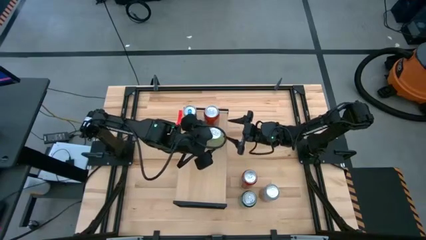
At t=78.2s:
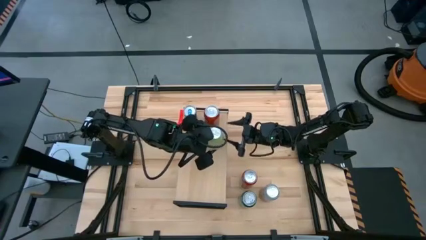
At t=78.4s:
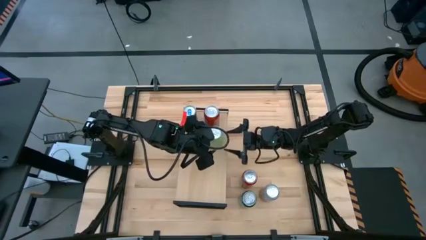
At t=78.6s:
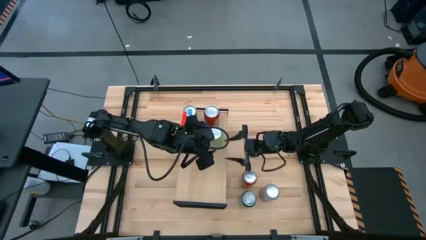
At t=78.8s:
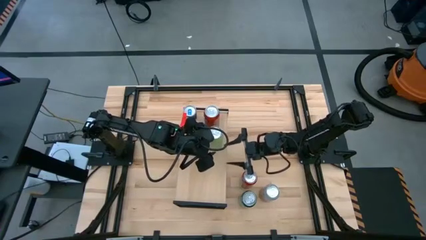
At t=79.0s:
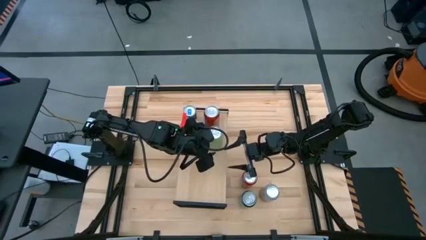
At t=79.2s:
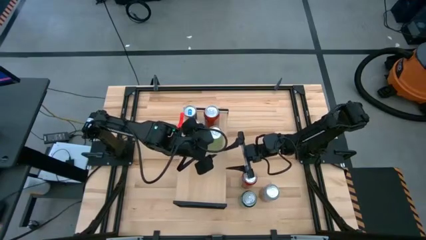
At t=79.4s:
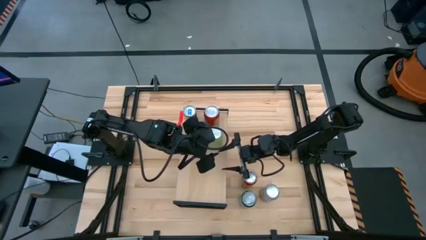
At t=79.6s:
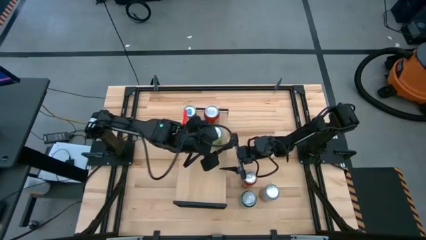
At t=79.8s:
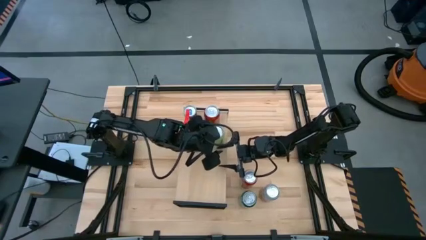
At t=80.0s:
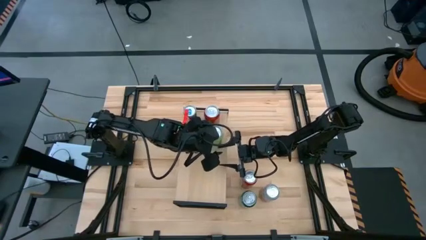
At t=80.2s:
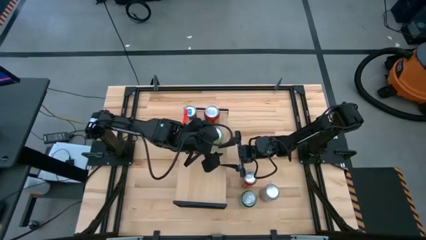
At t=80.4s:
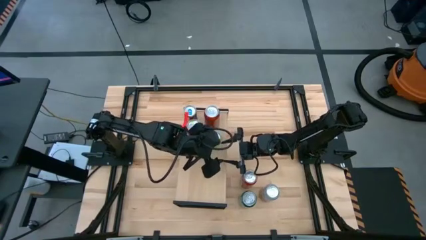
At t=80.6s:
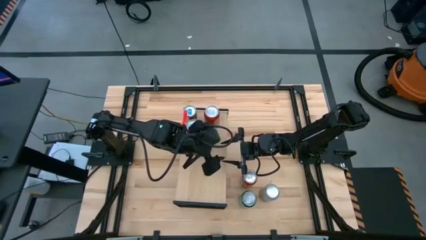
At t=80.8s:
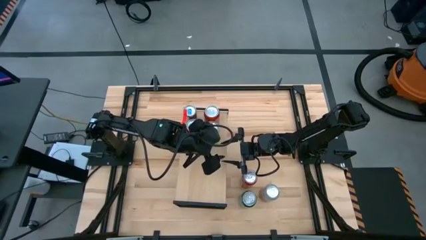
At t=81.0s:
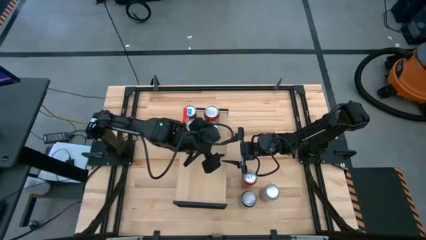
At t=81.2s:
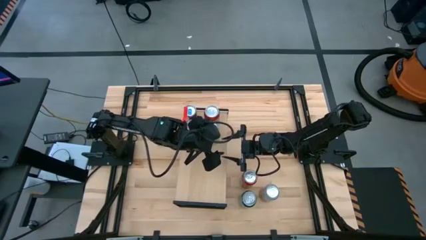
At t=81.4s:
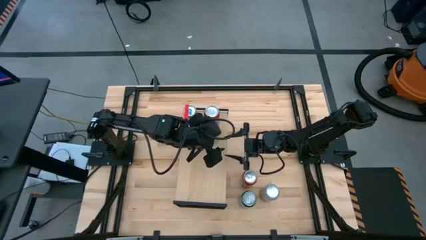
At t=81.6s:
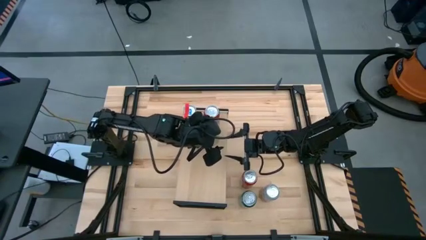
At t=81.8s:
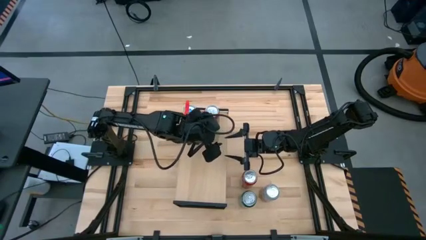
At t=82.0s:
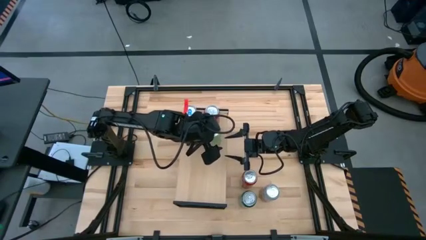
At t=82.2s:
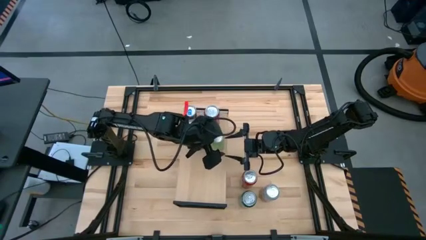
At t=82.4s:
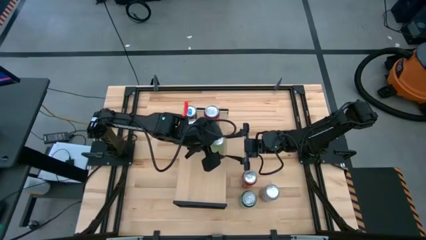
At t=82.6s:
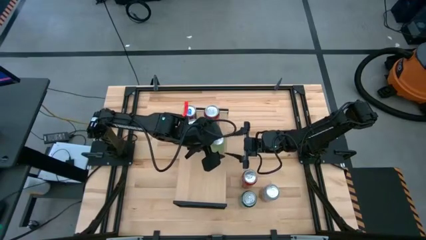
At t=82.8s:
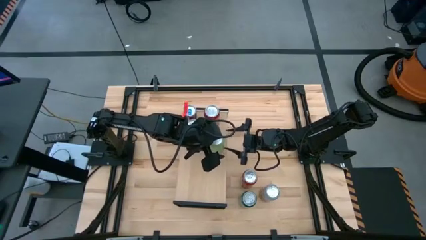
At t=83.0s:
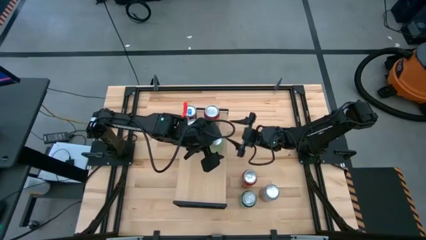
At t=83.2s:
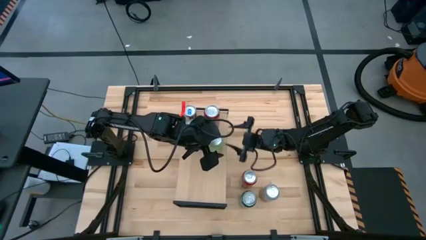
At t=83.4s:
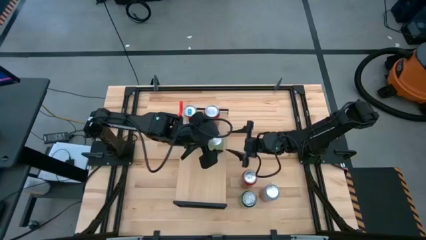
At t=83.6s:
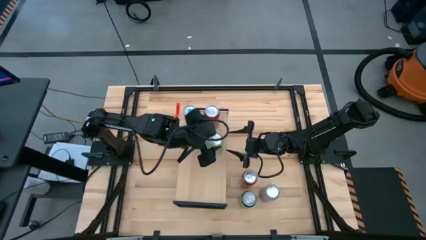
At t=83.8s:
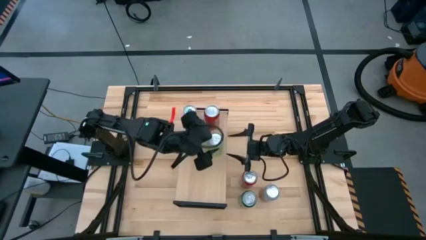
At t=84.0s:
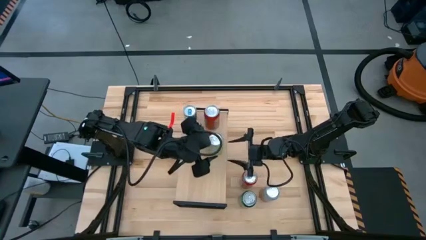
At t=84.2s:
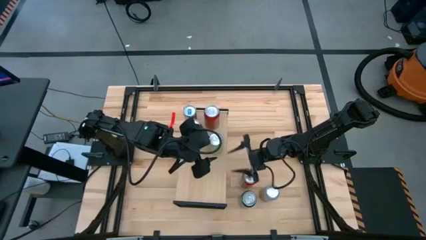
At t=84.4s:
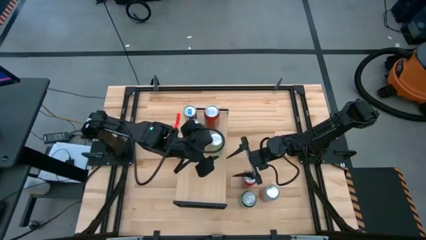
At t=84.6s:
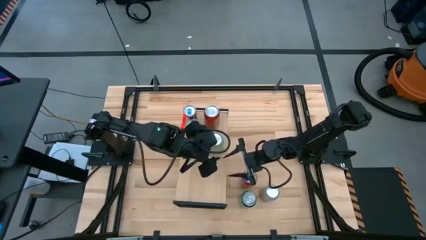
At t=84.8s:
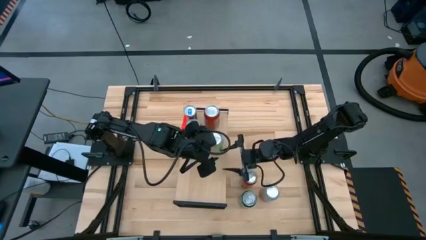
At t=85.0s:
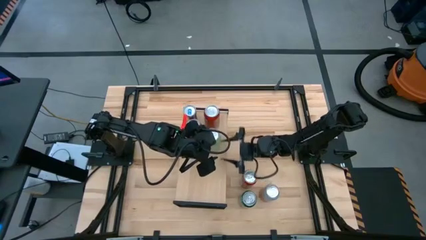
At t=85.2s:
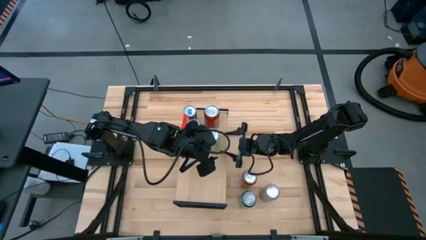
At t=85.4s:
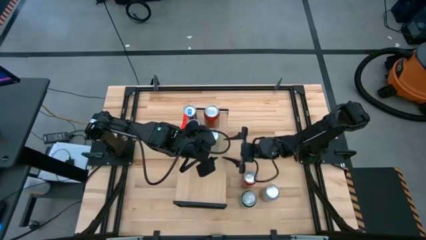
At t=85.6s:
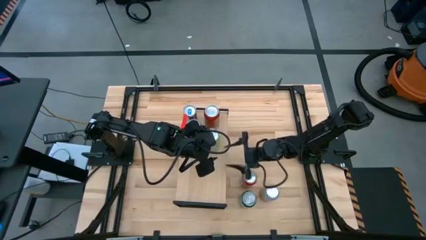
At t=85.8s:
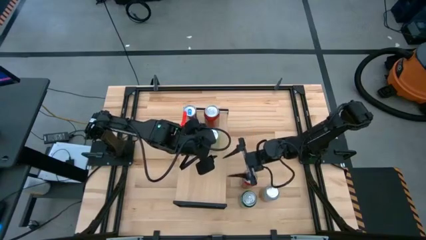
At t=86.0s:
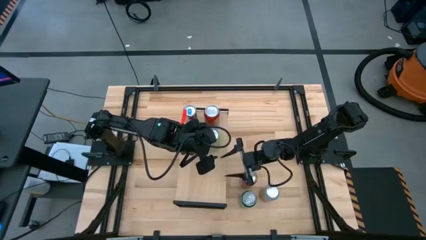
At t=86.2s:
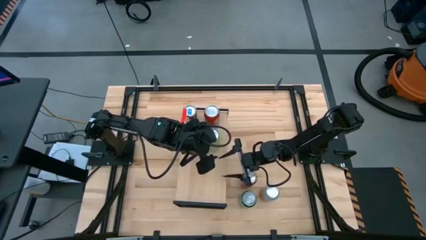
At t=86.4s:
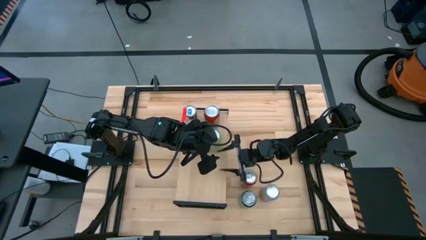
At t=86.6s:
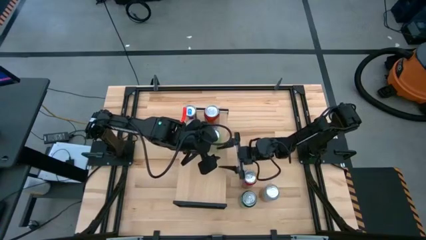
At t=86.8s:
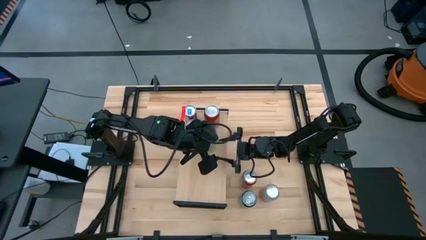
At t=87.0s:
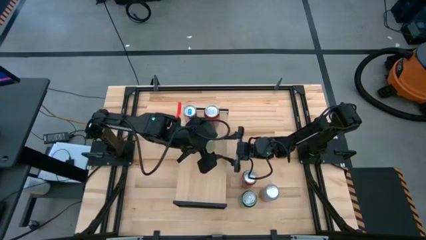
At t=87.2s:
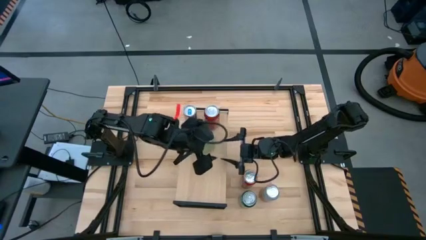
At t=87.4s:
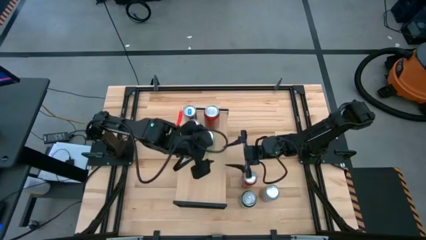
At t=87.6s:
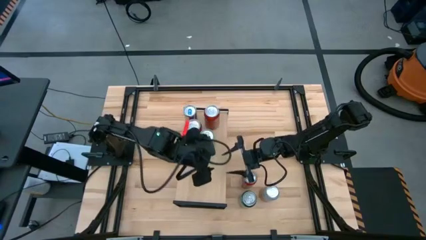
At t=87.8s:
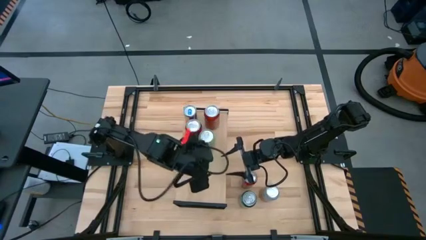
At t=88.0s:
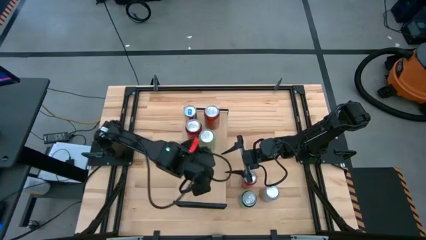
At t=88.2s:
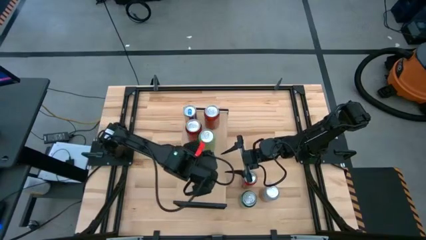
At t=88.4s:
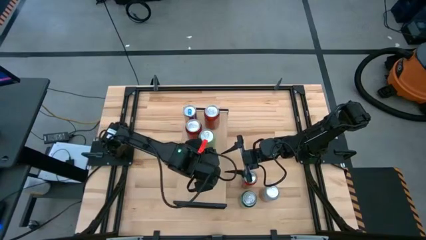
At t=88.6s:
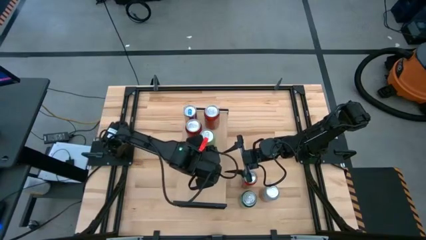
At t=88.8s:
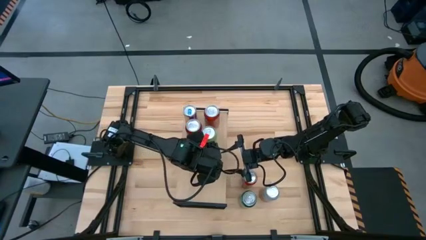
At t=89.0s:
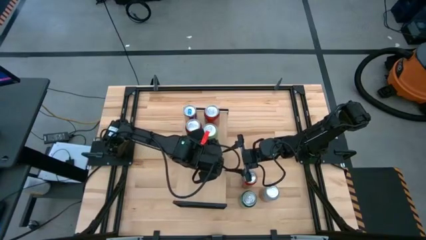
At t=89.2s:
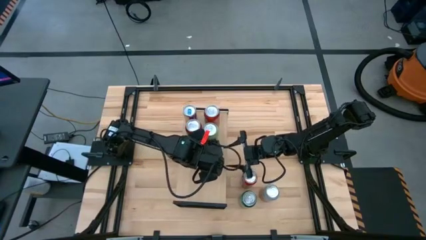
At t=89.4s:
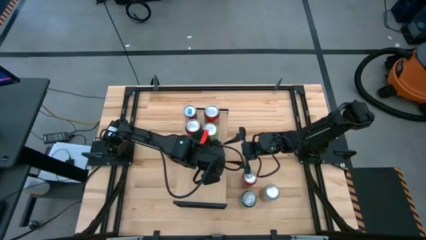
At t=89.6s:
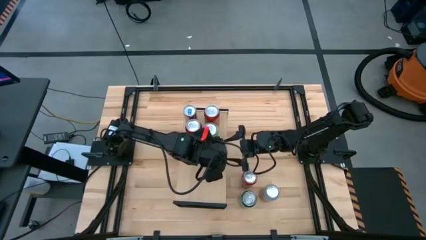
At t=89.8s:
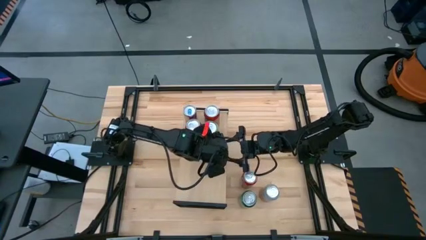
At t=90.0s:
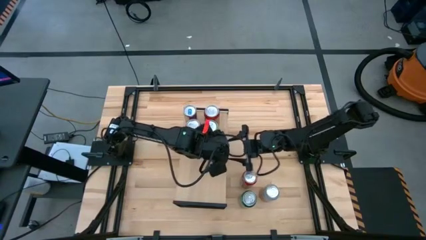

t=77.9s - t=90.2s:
Task: Place canned beverage on shelf
Put the light green soda can on the shelf
